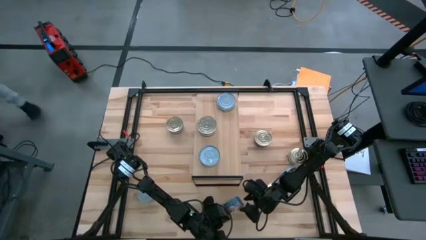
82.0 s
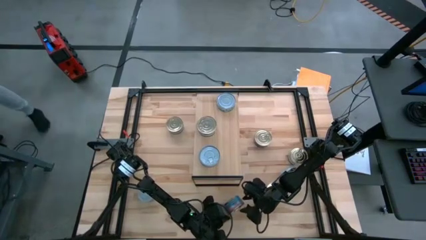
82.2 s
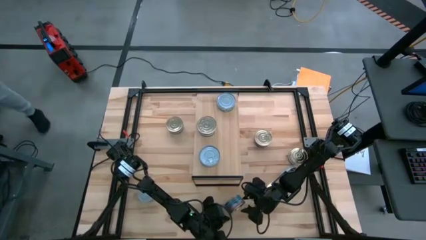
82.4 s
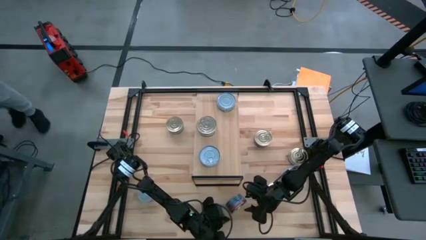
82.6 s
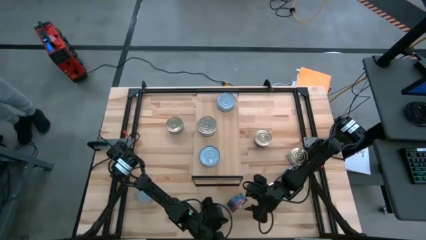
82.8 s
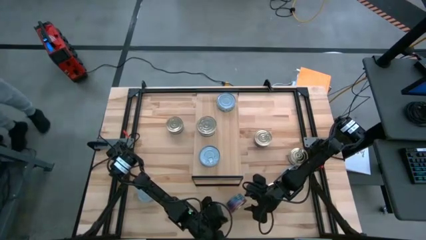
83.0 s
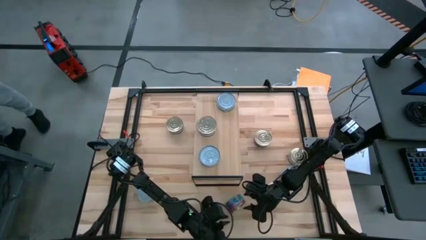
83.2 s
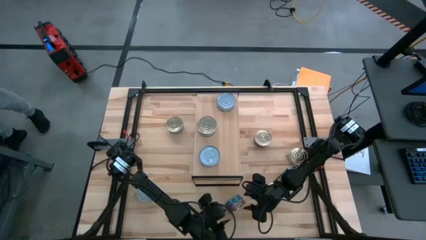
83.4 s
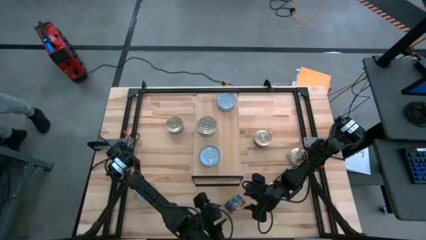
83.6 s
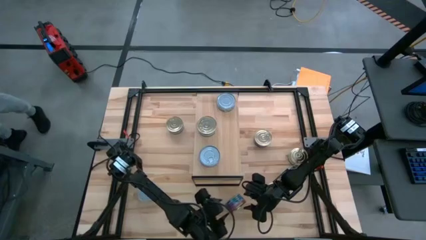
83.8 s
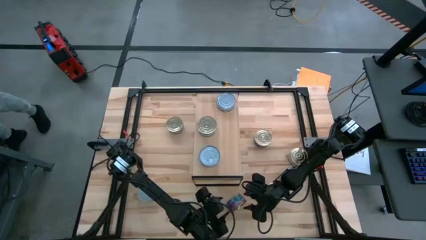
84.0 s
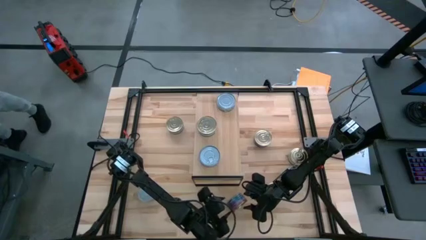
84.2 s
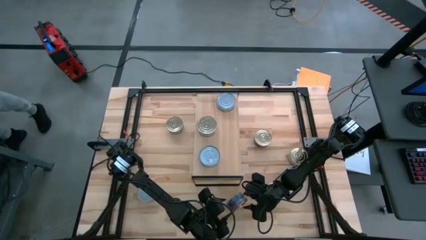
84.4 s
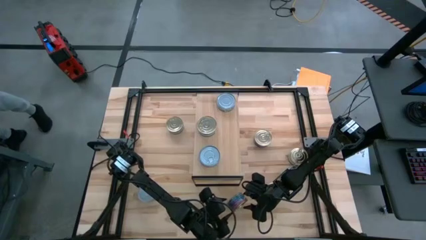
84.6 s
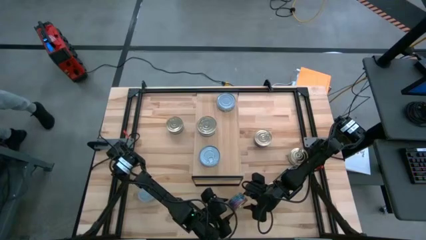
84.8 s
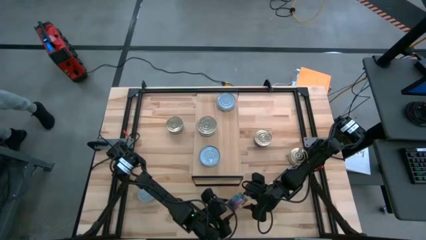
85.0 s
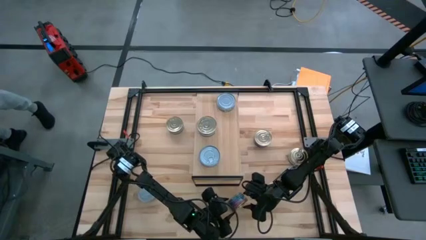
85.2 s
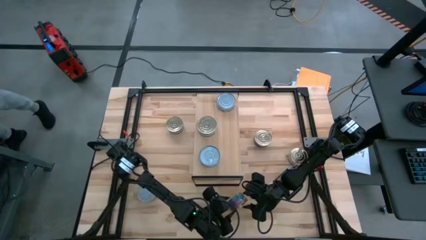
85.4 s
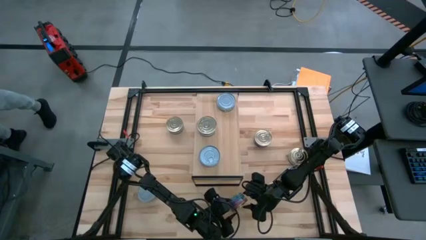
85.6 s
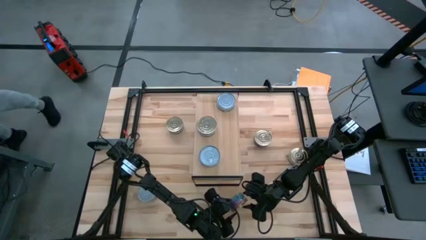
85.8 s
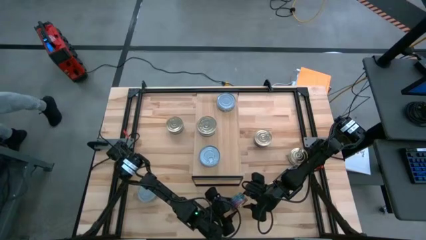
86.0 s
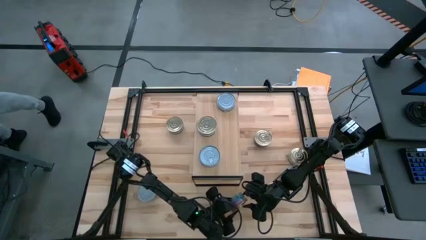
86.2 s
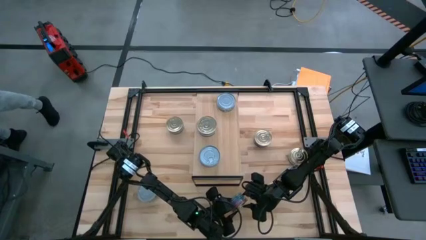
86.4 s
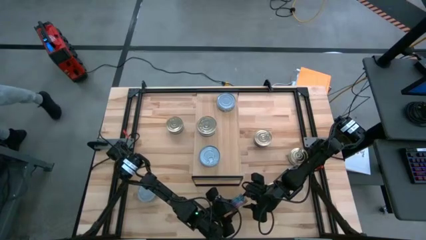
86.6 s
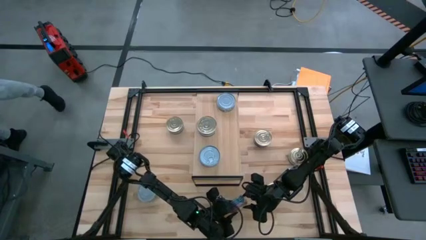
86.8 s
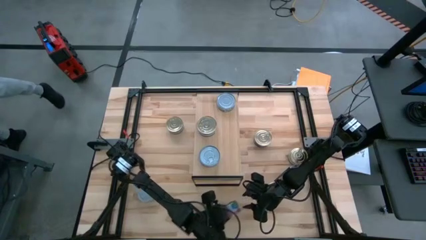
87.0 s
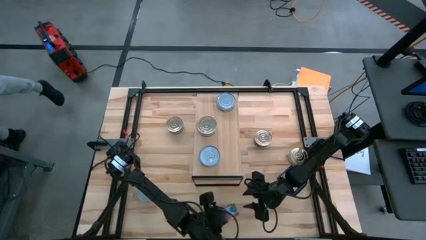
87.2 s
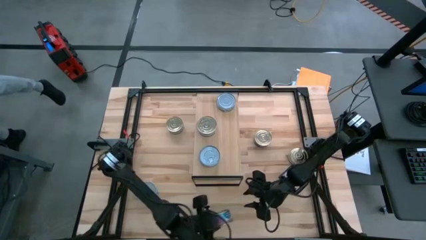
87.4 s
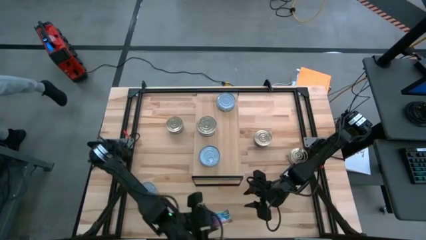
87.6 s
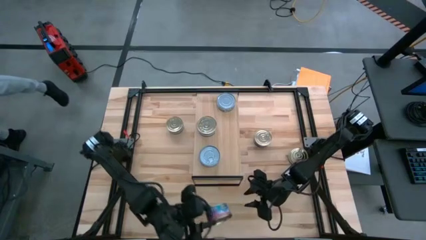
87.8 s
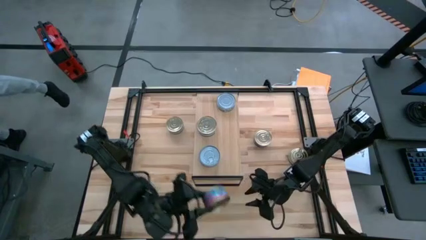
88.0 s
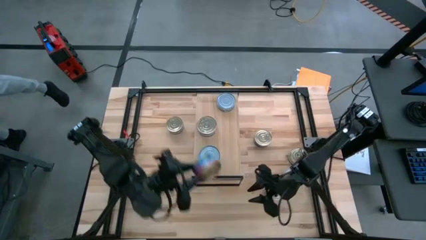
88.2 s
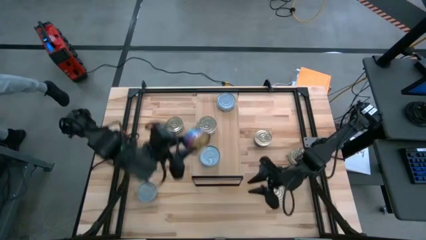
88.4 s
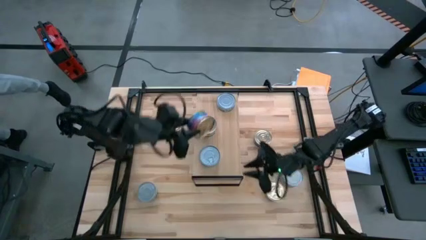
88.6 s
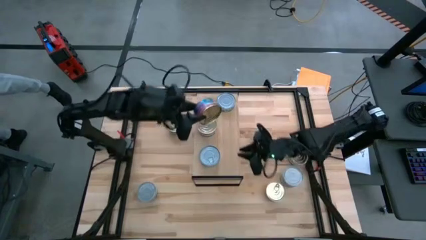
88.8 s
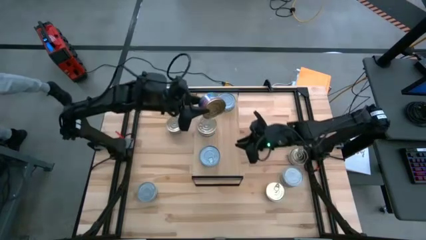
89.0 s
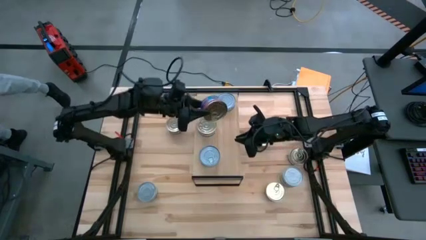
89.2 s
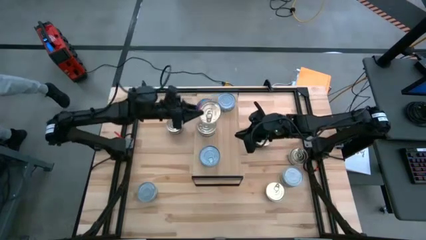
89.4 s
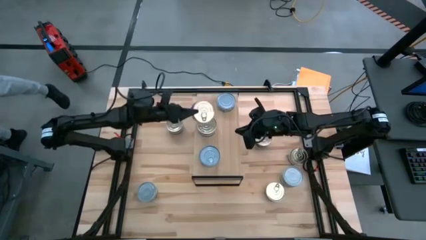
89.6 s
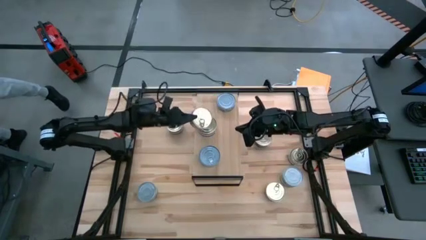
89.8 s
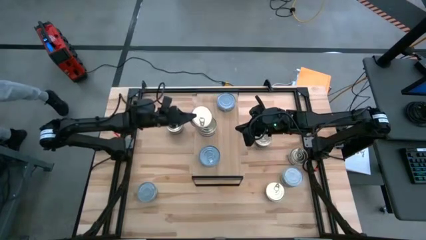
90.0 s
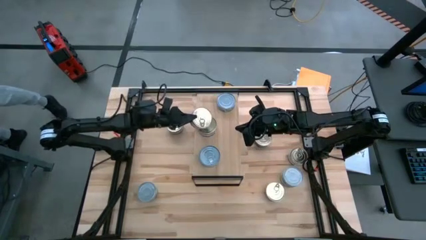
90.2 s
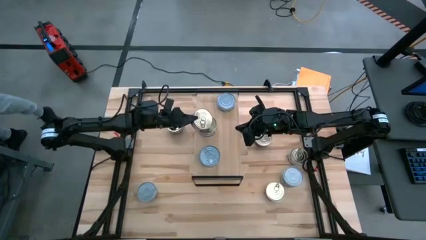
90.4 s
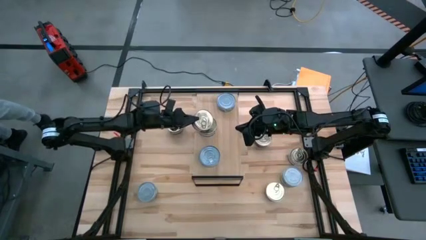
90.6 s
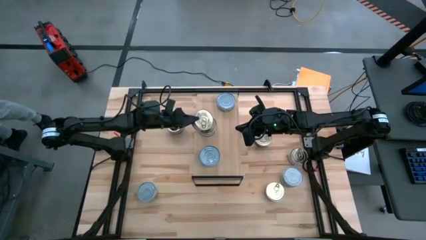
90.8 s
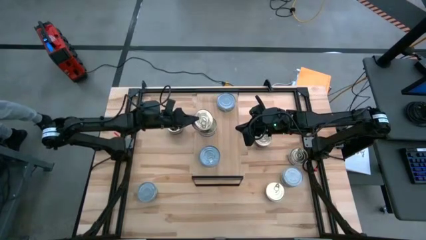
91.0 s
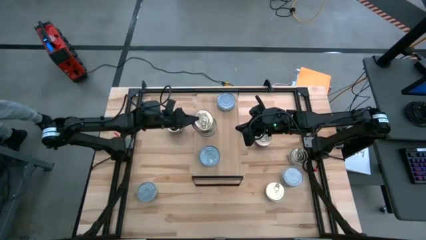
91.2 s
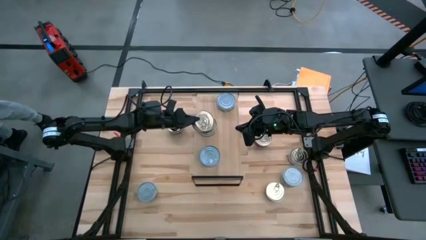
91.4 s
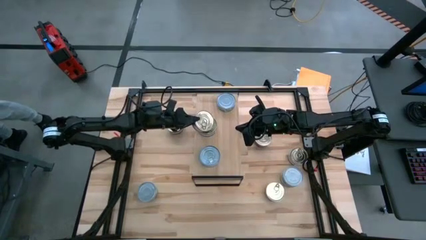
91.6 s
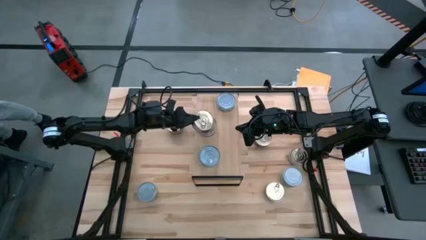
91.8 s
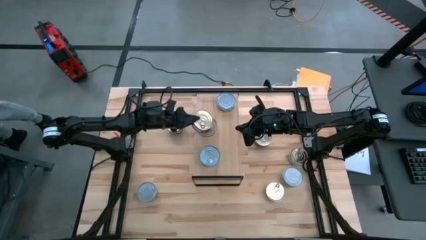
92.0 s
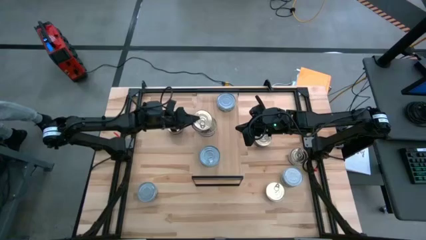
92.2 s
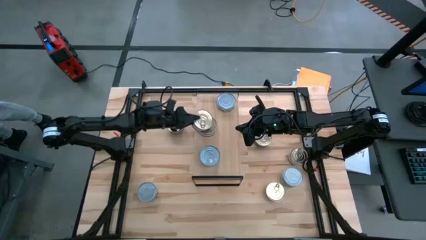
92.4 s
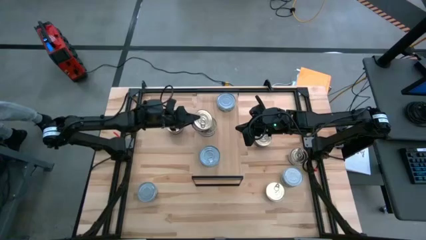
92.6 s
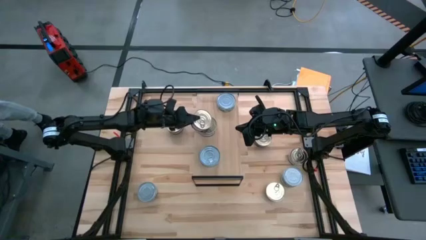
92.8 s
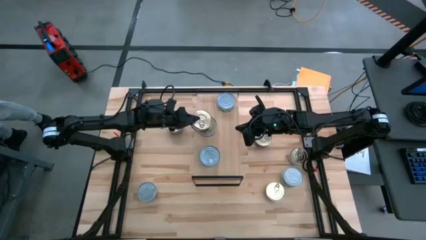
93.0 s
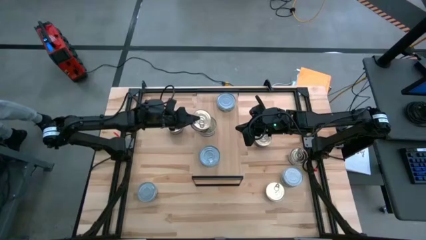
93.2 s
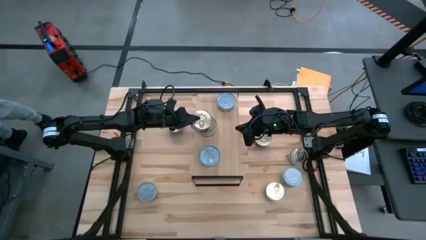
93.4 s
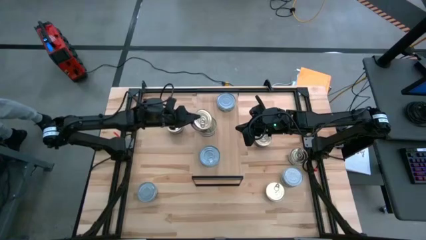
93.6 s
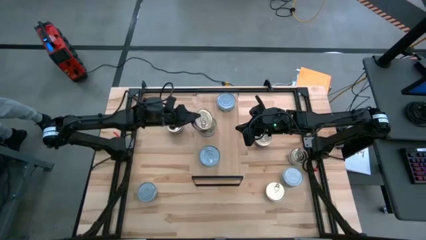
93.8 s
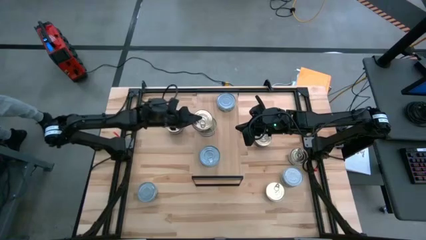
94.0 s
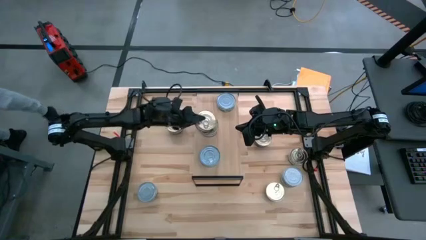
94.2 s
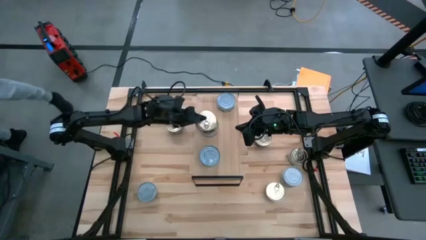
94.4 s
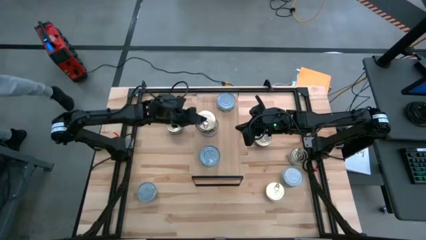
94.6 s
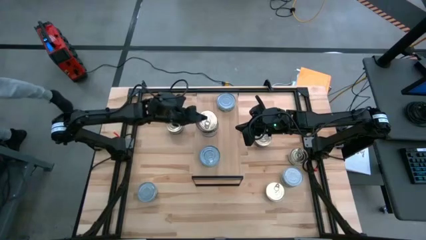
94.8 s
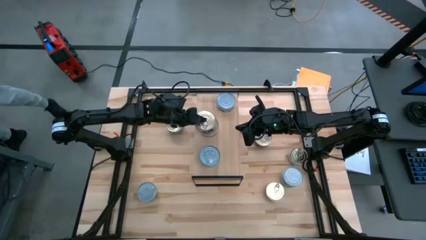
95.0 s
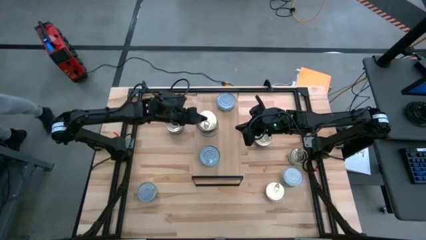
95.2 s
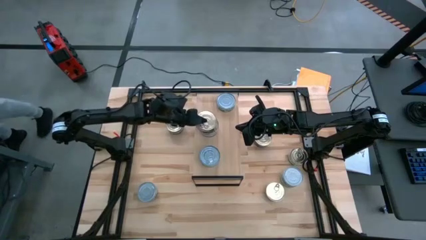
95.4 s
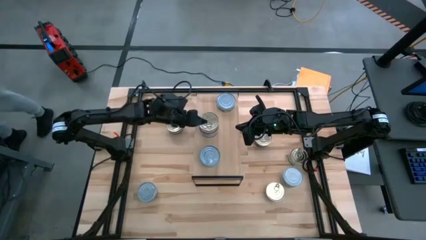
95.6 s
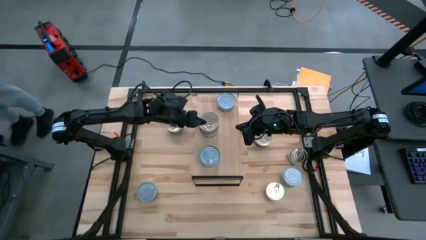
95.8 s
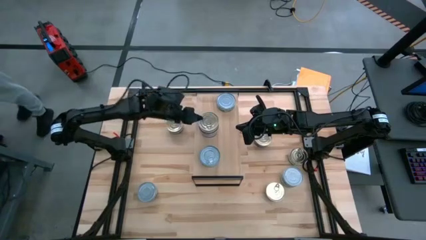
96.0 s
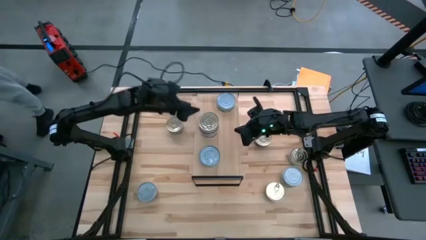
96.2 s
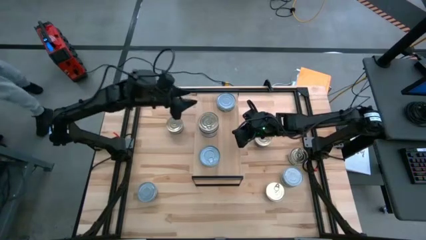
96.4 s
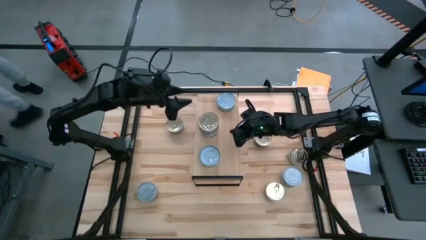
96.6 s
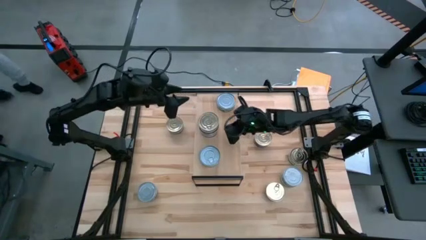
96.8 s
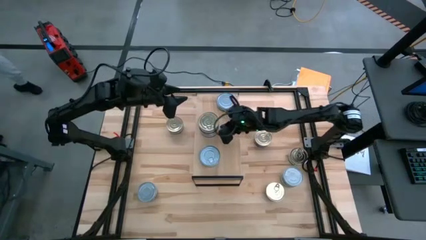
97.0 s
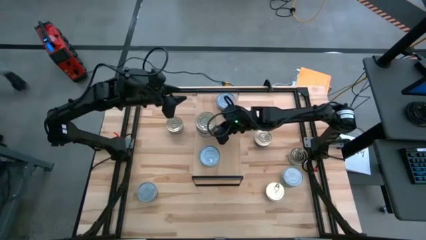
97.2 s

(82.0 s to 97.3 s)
Task: Stack canned seafood by type on shelf
Stack the blue and pink tuna can on top of the blue and pink tuna can on the shelf
